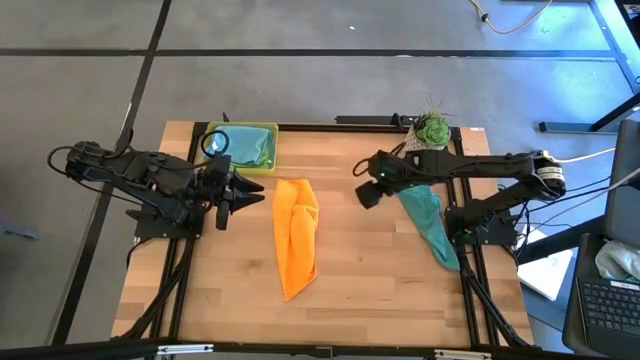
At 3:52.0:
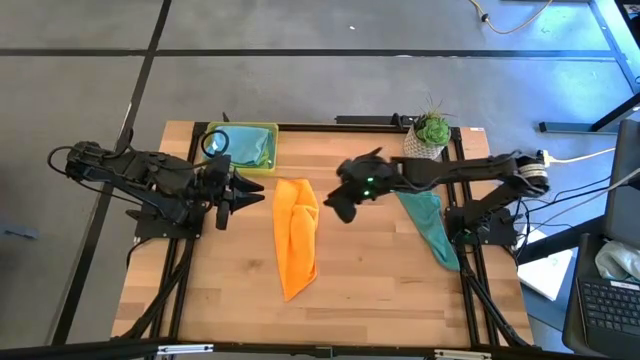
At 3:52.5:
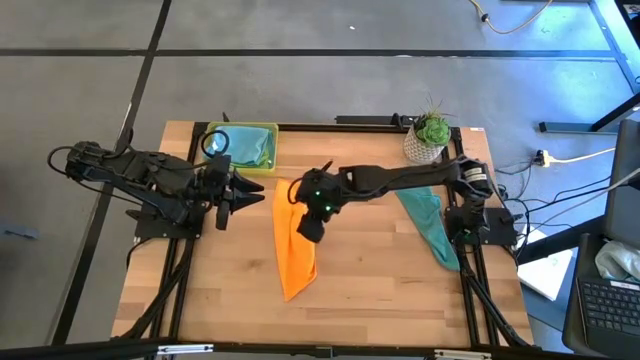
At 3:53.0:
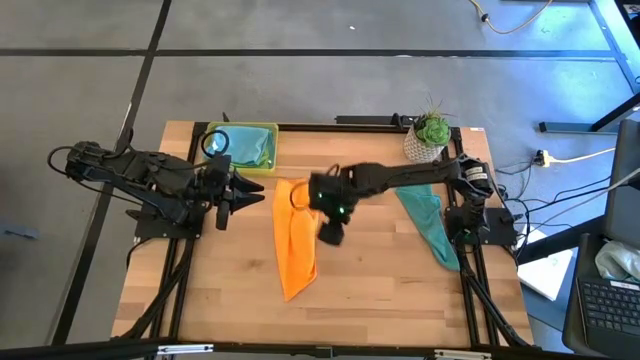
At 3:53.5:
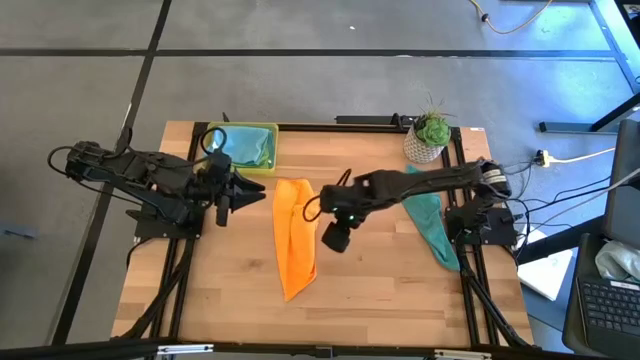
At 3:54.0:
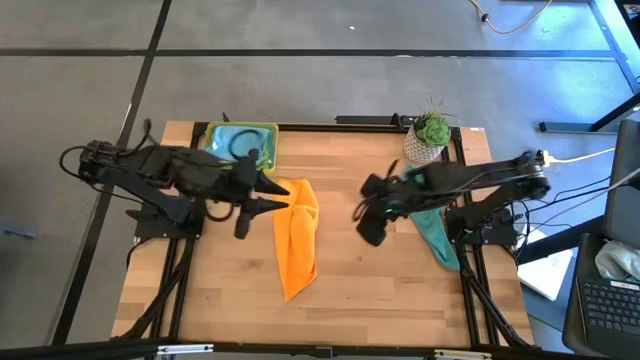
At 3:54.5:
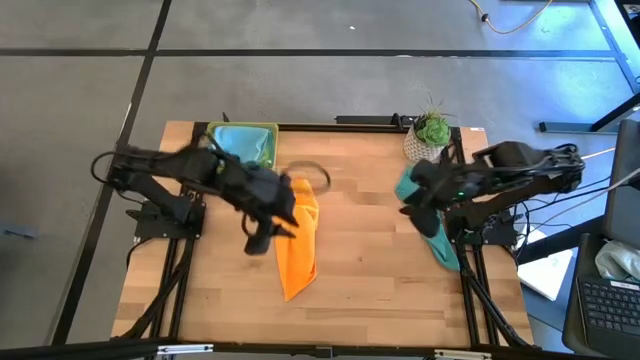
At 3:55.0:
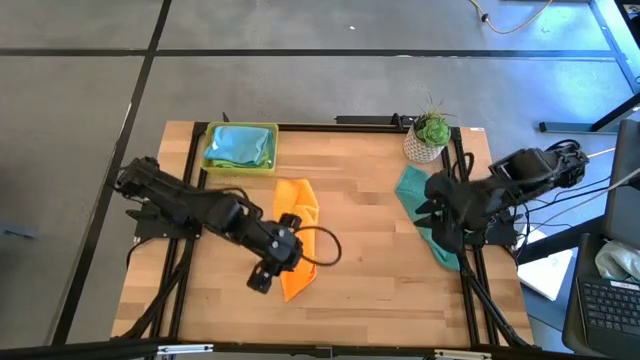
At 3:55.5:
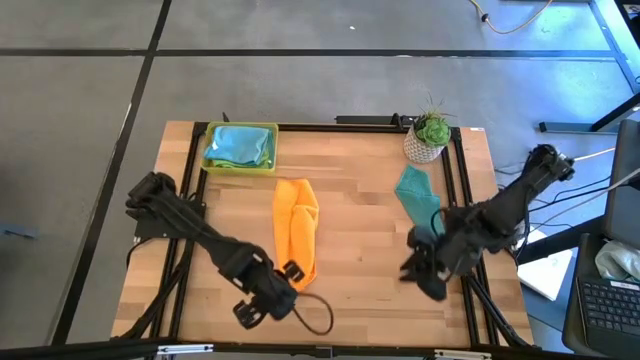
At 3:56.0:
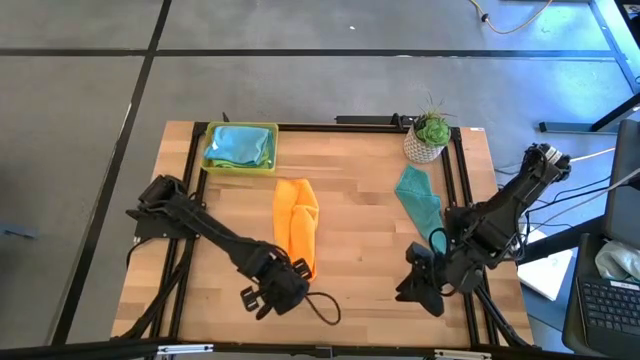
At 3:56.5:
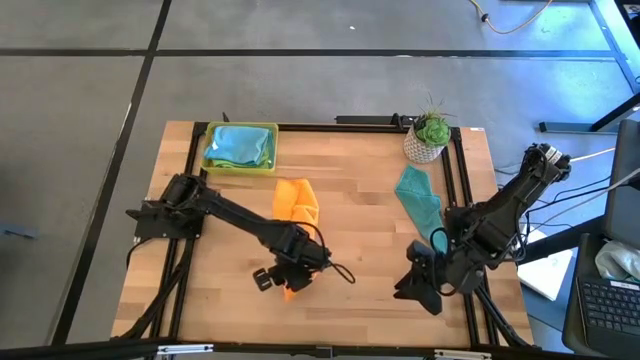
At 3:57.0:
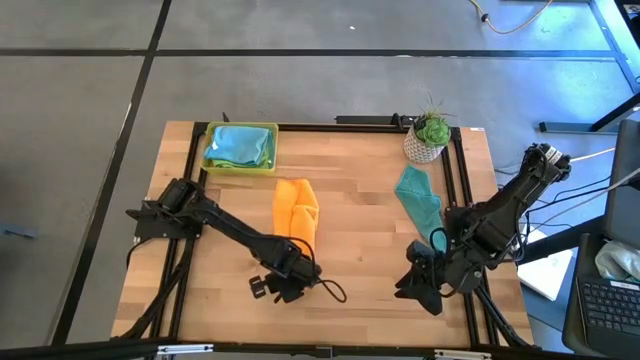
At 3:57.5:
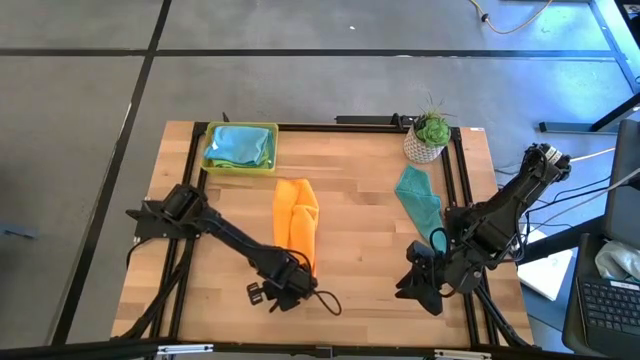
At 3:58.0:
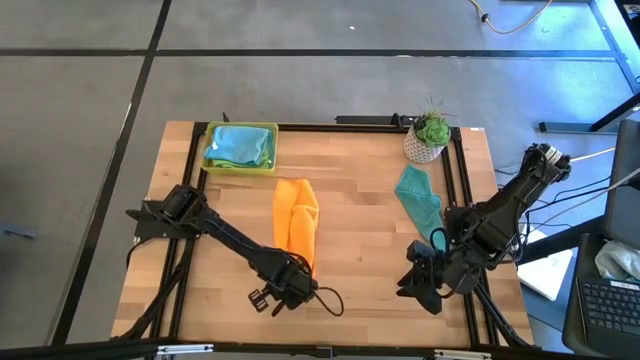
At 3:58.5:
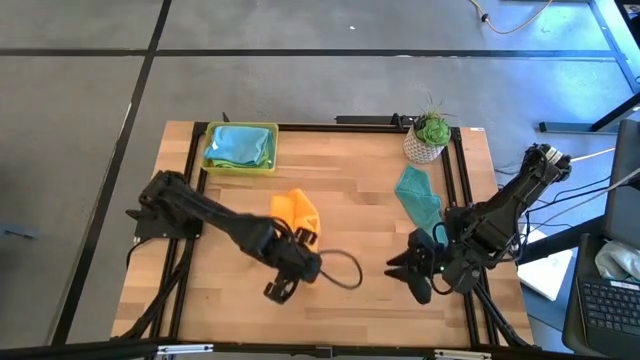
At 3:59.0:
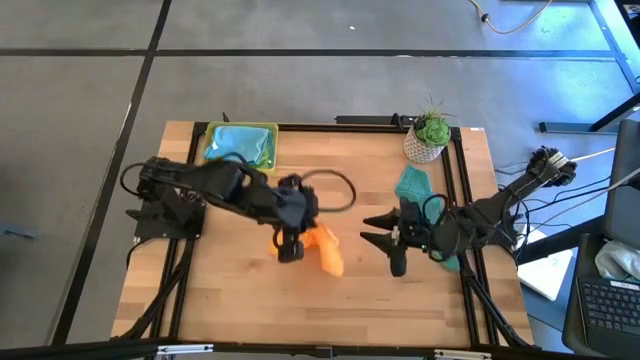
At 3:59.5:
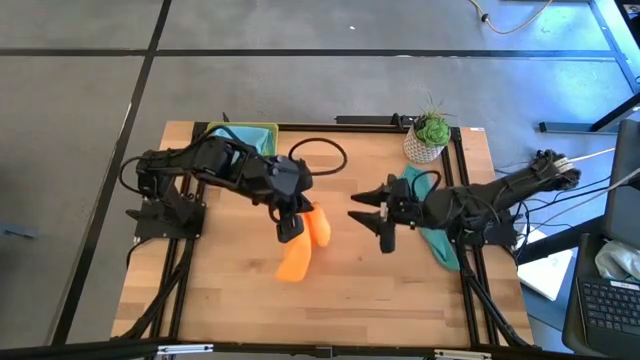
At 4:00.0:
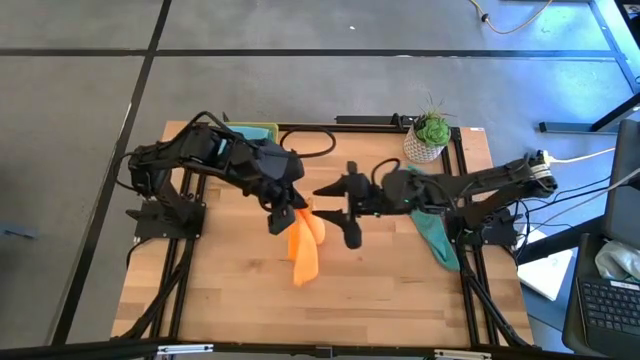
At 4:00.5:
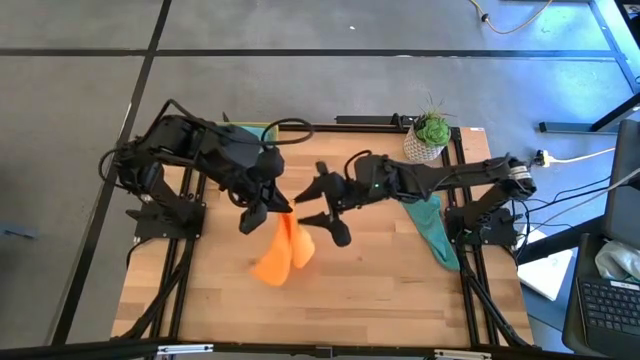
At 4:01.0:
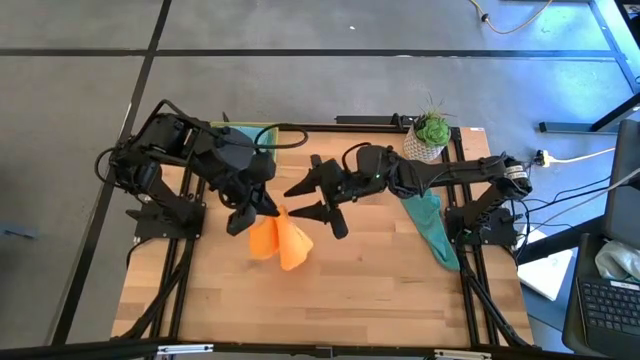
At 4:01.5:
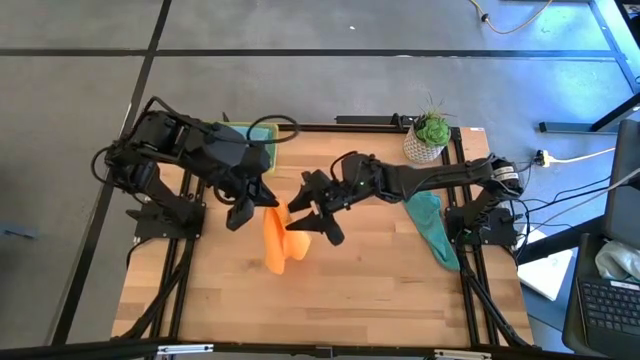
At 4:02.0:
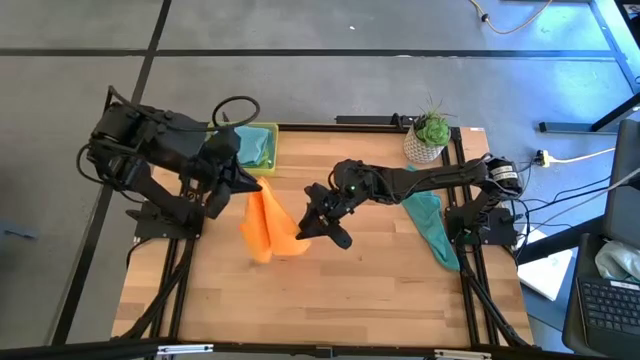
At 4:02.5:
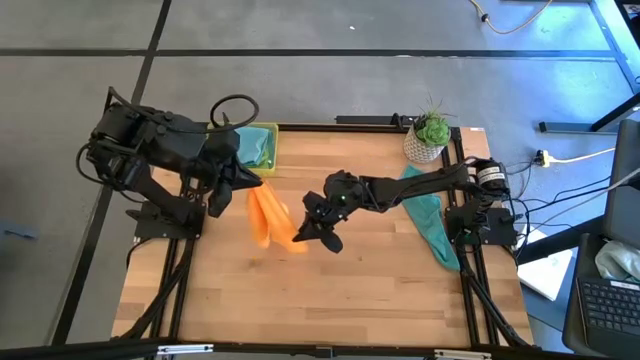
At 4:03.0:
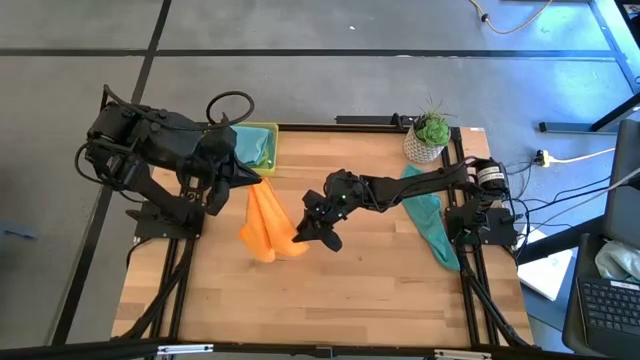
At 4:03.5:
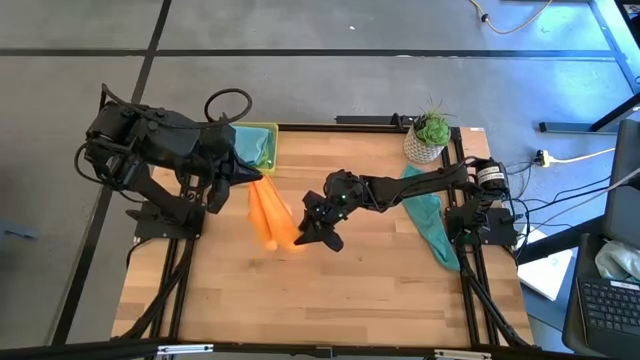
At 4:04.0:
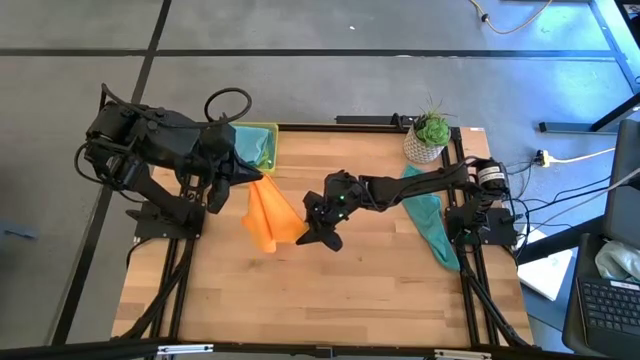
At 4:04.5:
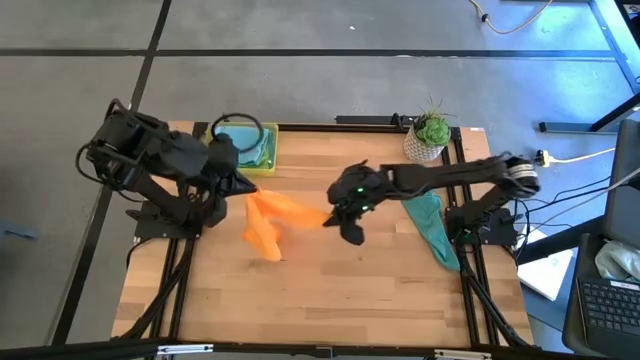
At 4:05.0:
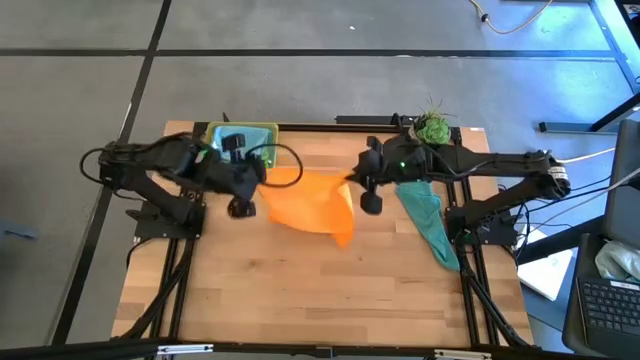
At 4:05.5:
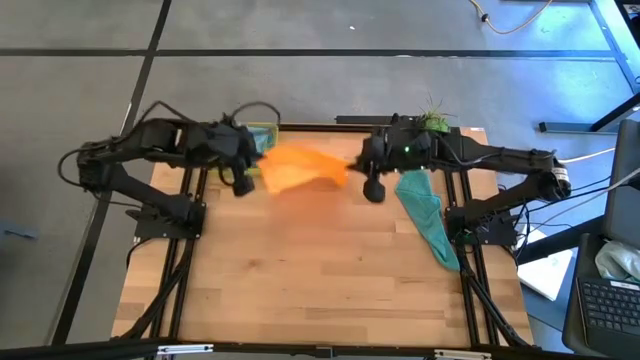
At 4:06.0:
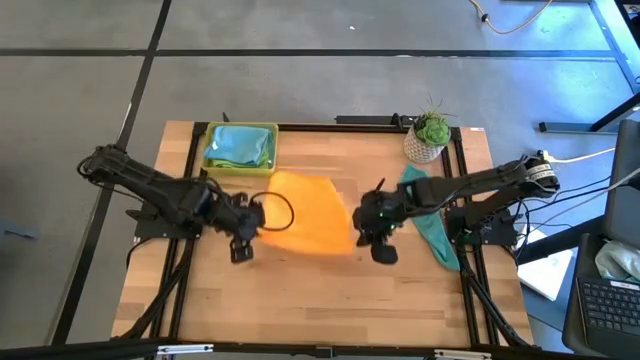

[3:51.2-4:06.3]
Task: Fold microfiber towels
Fold the orange towel

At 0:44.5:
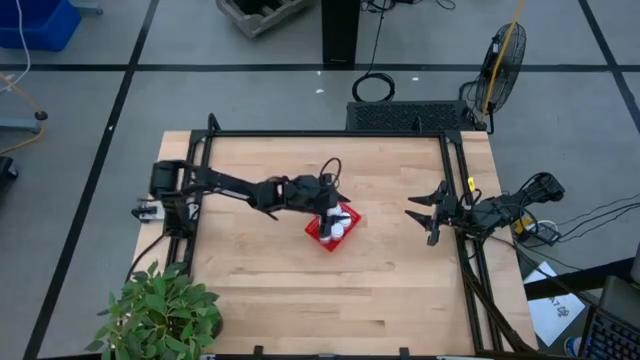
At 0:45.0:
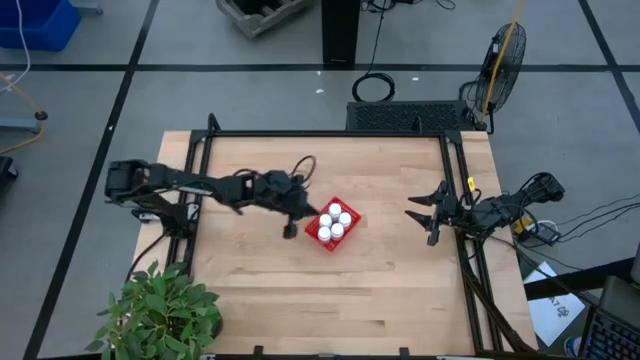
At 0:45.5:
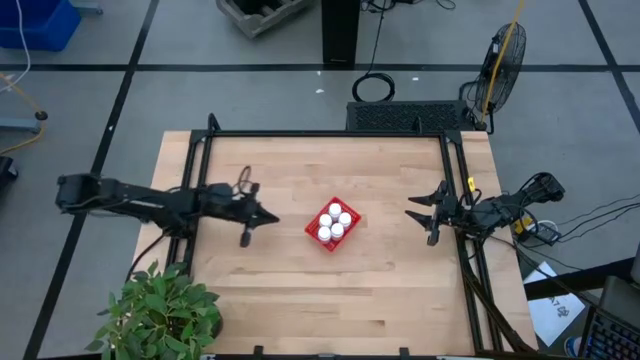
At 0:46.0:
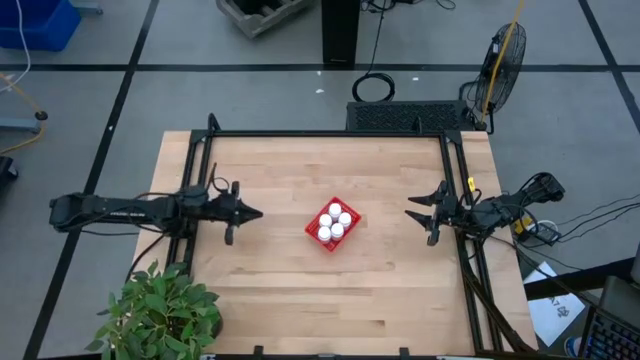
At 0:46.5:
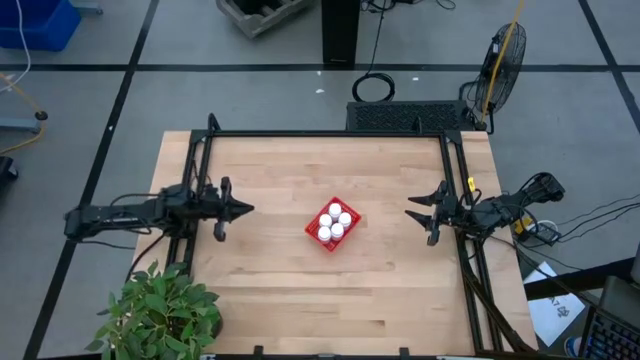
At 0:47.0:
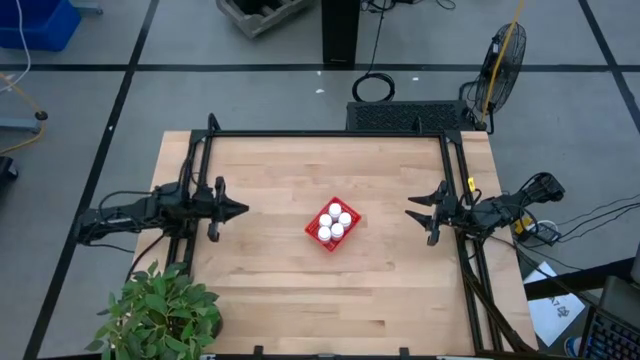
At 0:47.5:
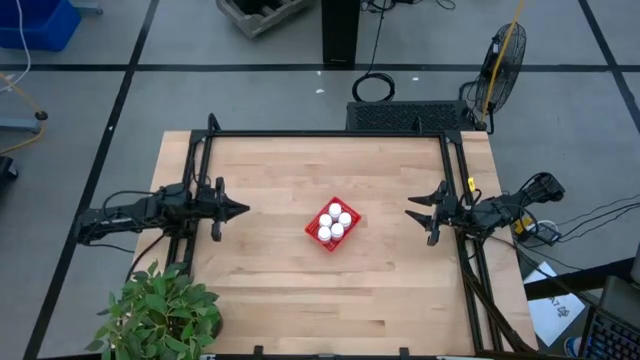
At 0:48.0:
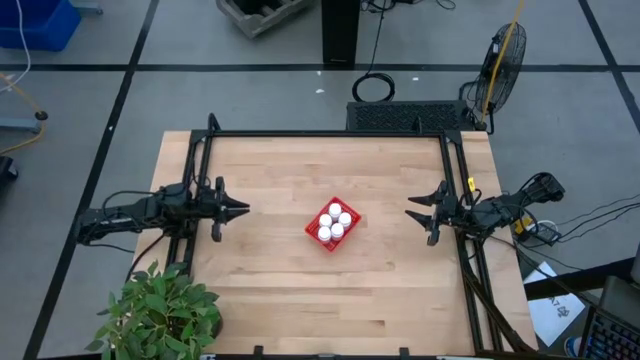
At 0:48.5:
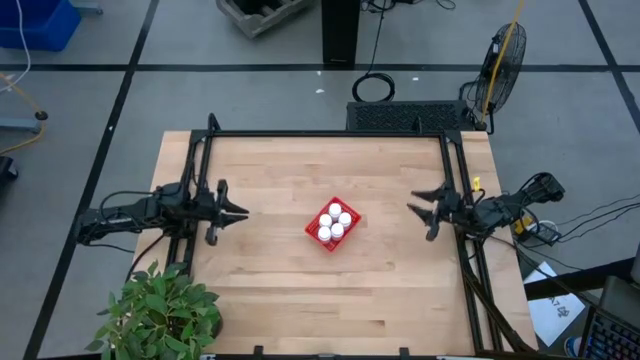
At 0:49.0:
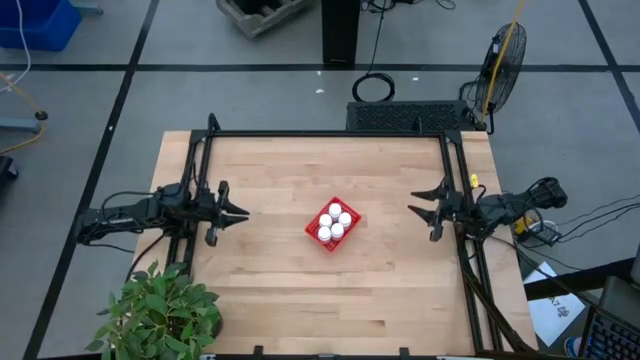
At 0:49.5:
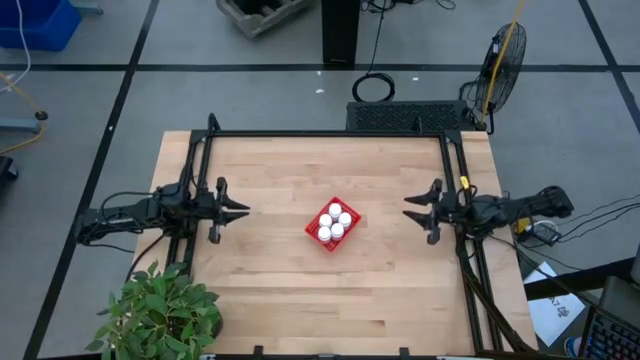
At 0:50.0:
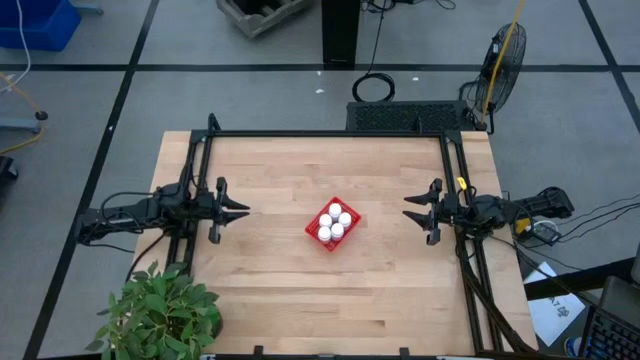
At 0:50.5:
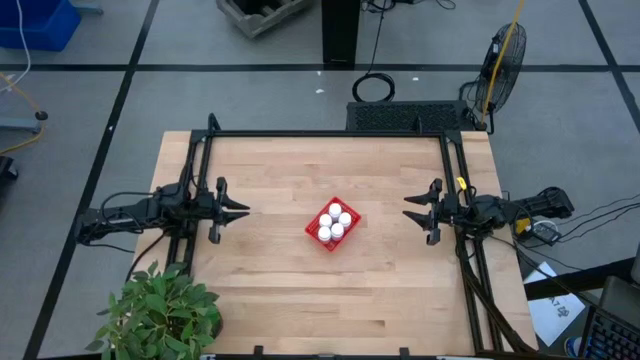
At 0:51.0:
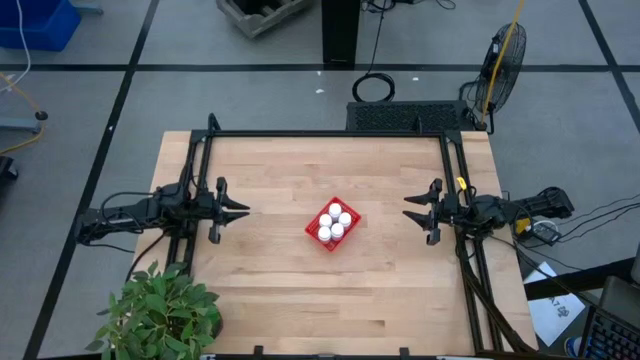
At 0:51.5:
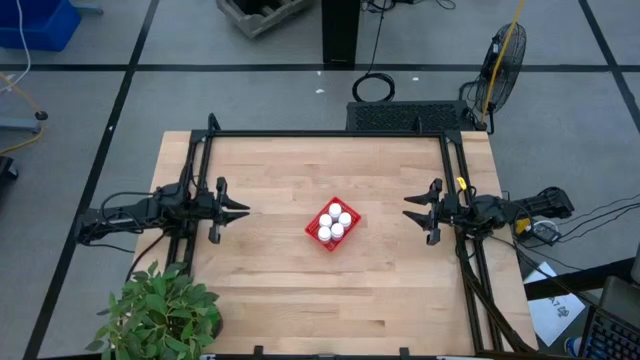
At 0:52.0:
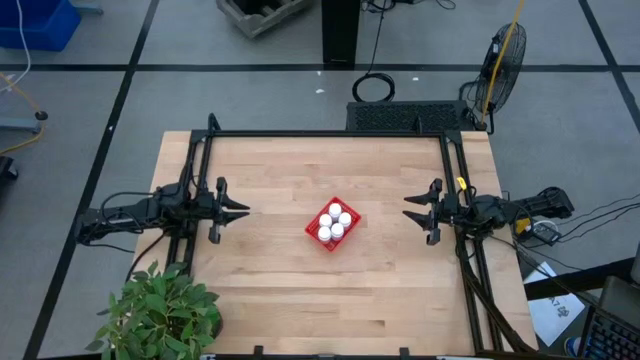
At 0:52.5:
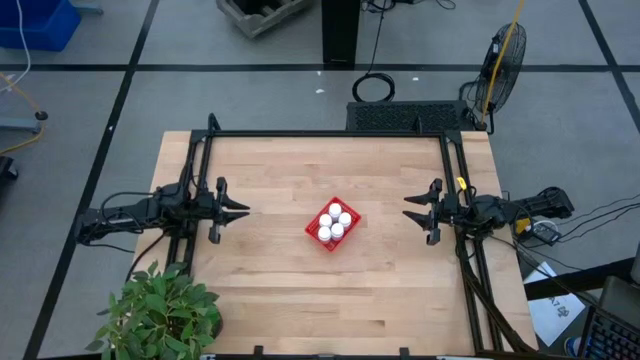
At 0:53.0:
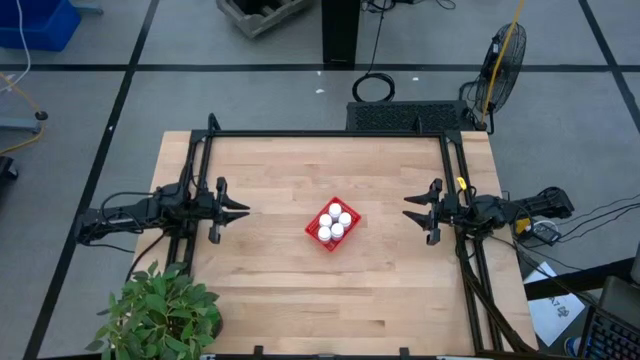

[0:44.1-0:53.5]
Task: Pick and place pill bottles into a basket
Return to Home Position
